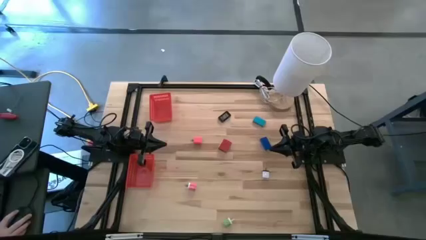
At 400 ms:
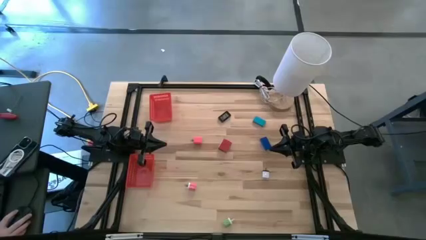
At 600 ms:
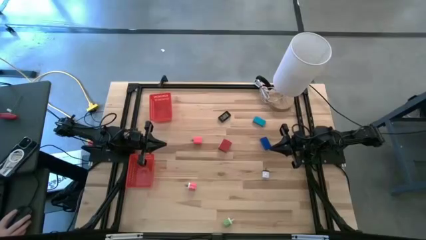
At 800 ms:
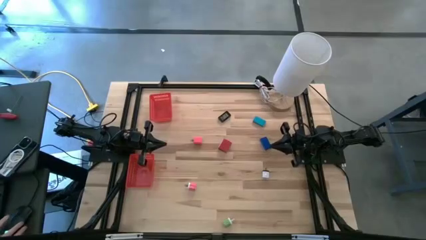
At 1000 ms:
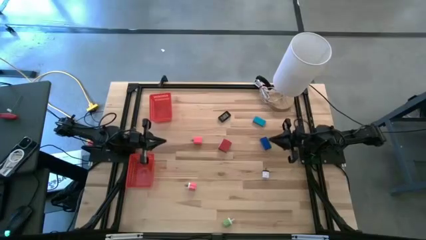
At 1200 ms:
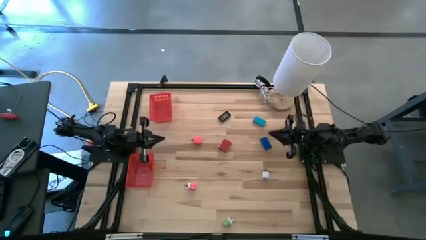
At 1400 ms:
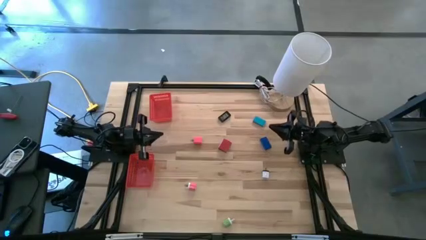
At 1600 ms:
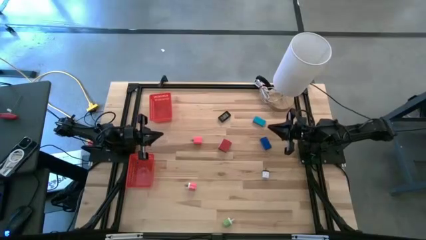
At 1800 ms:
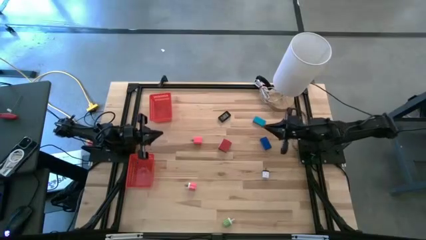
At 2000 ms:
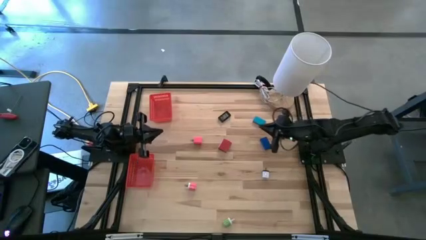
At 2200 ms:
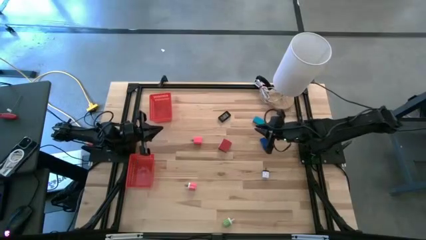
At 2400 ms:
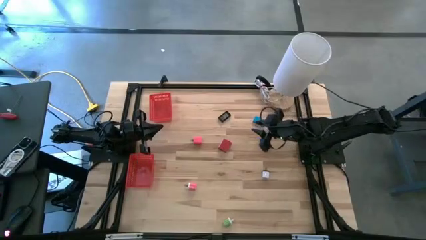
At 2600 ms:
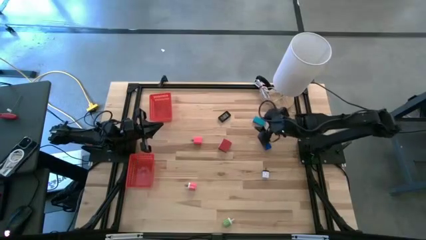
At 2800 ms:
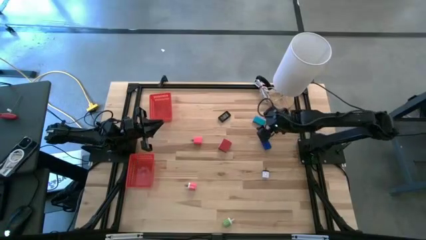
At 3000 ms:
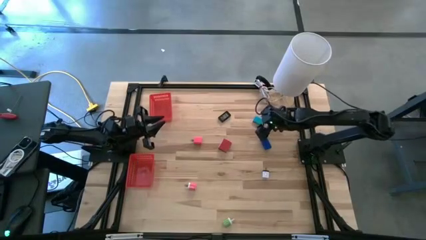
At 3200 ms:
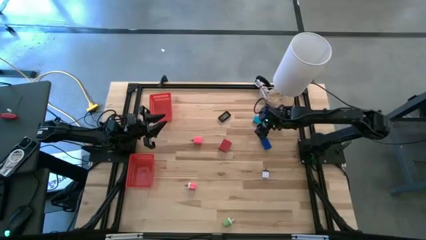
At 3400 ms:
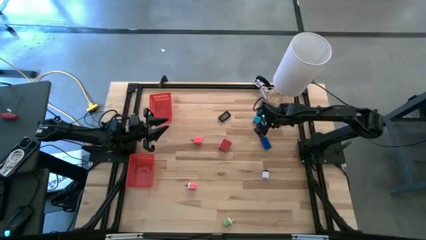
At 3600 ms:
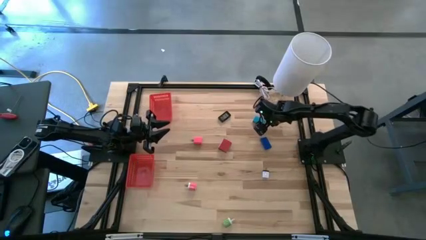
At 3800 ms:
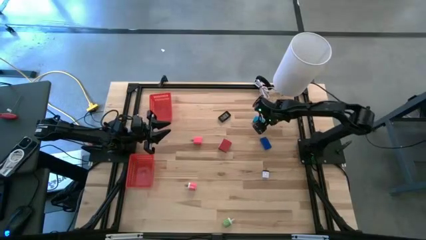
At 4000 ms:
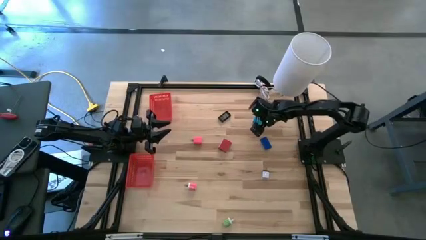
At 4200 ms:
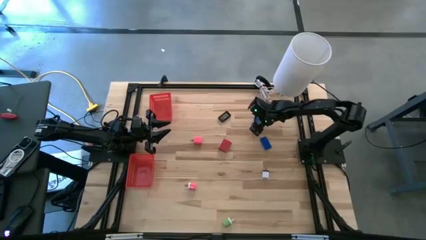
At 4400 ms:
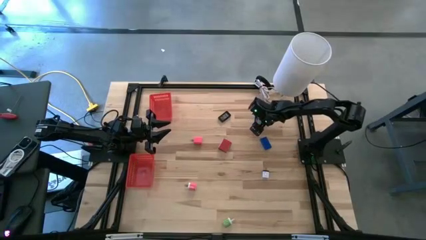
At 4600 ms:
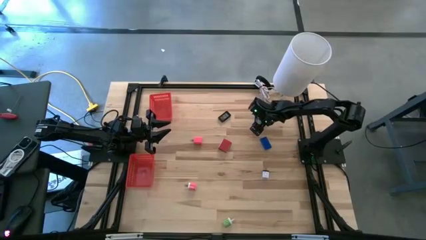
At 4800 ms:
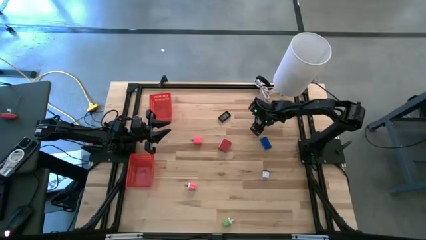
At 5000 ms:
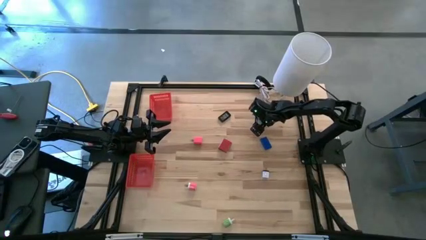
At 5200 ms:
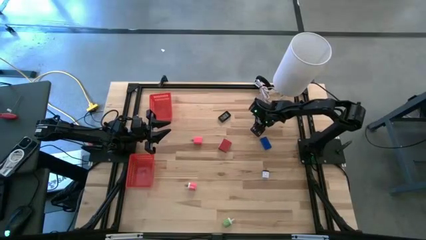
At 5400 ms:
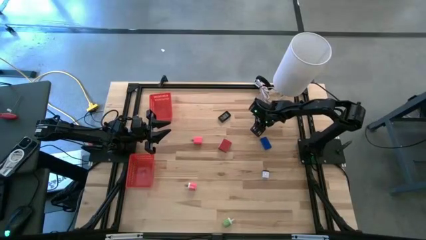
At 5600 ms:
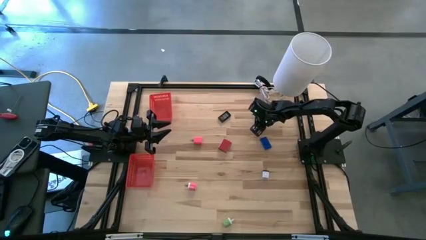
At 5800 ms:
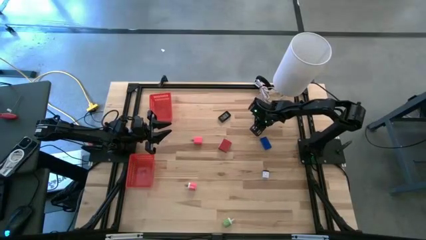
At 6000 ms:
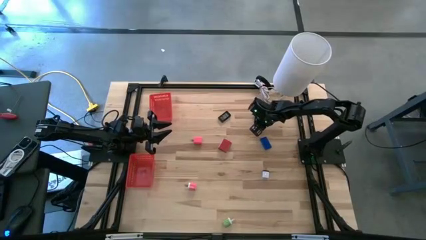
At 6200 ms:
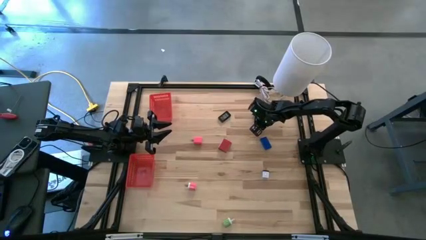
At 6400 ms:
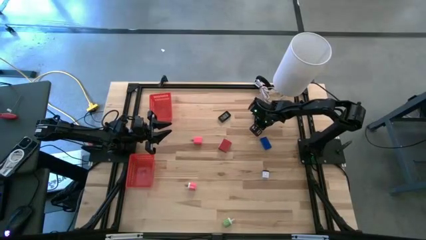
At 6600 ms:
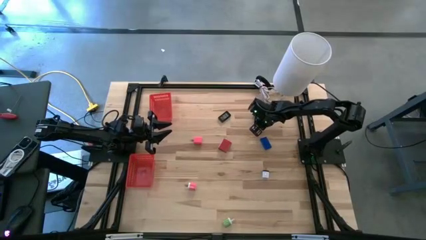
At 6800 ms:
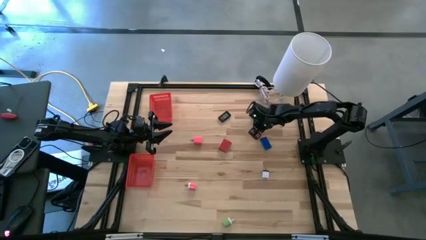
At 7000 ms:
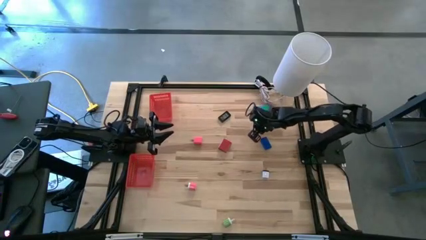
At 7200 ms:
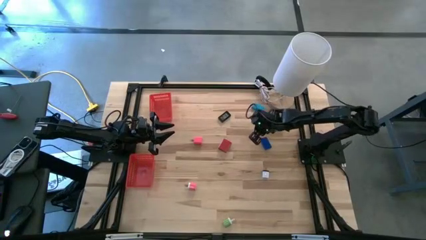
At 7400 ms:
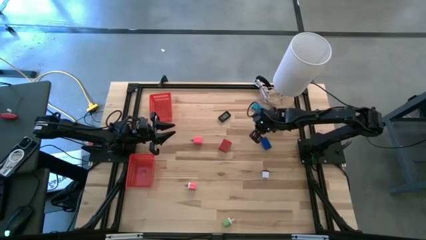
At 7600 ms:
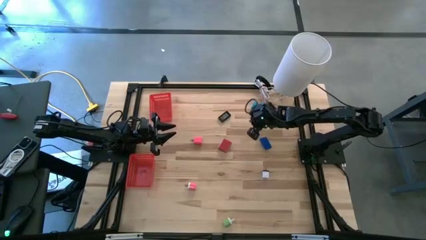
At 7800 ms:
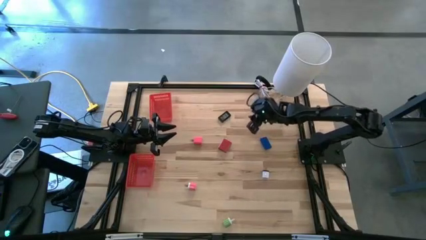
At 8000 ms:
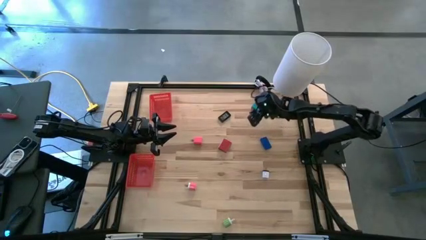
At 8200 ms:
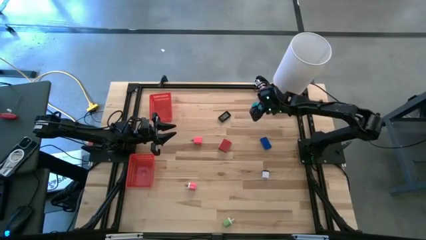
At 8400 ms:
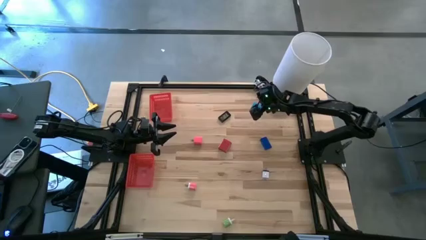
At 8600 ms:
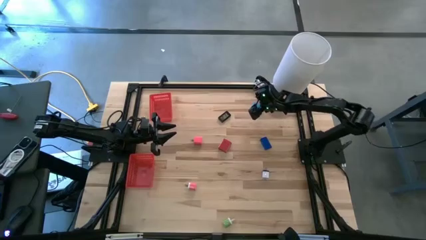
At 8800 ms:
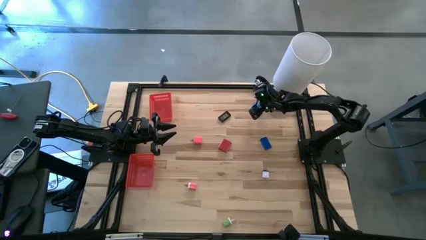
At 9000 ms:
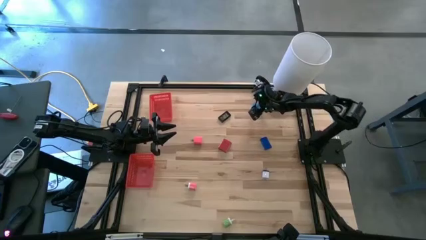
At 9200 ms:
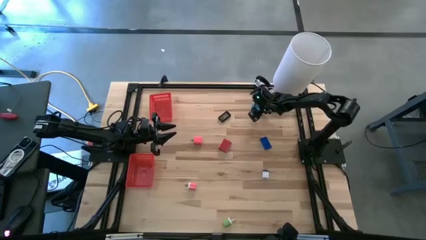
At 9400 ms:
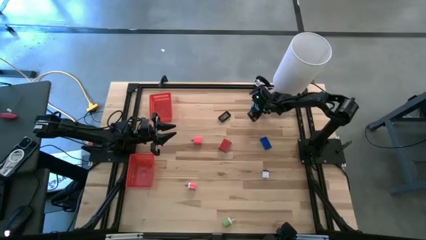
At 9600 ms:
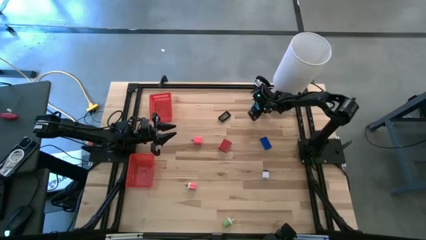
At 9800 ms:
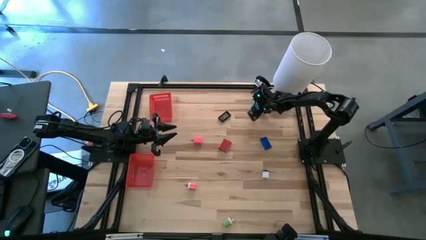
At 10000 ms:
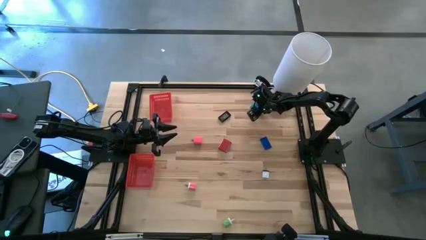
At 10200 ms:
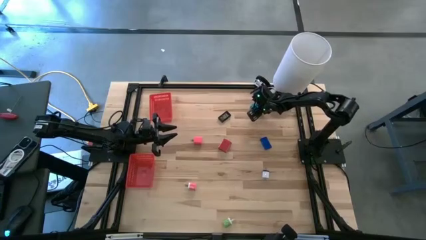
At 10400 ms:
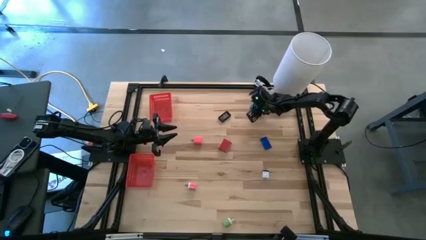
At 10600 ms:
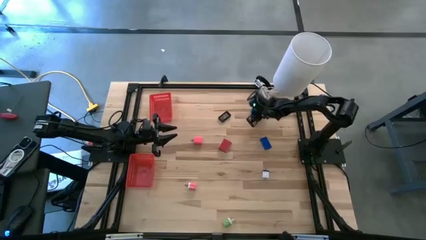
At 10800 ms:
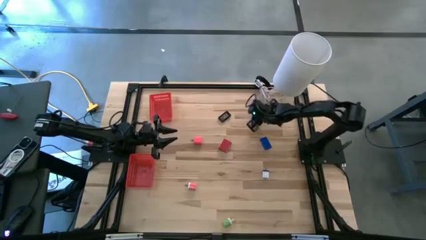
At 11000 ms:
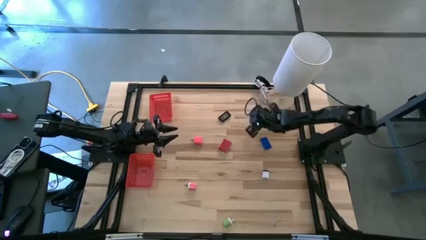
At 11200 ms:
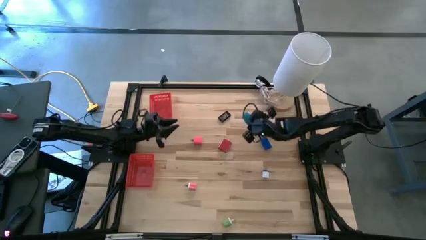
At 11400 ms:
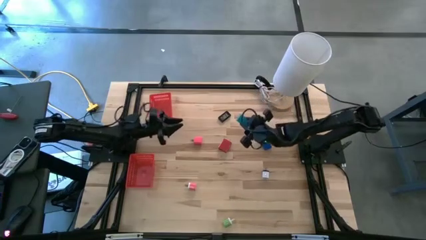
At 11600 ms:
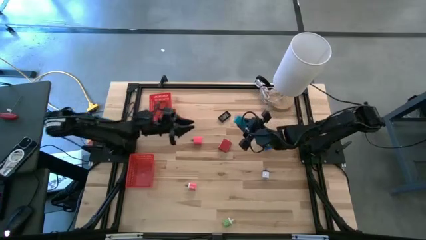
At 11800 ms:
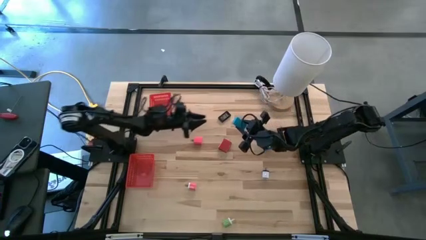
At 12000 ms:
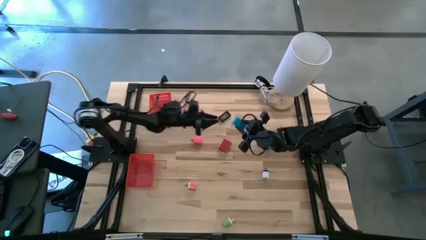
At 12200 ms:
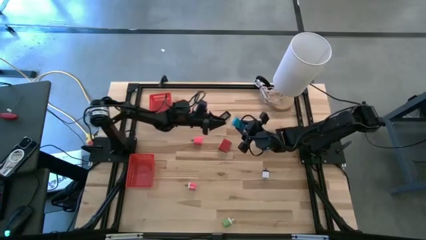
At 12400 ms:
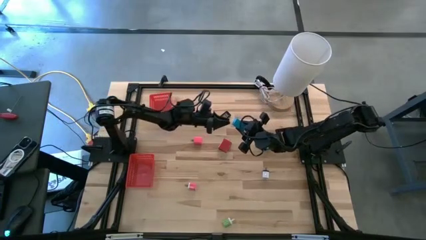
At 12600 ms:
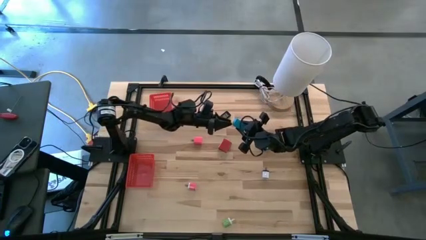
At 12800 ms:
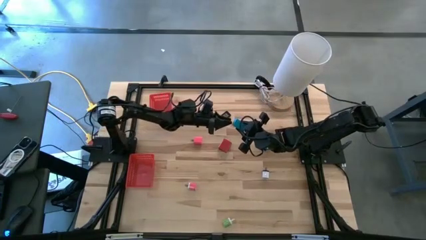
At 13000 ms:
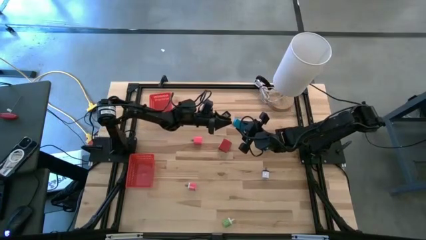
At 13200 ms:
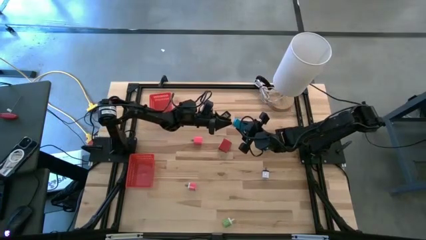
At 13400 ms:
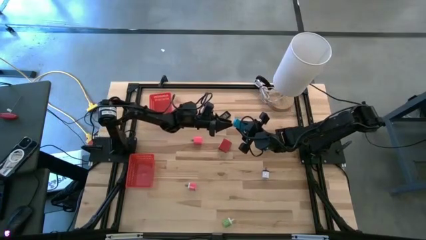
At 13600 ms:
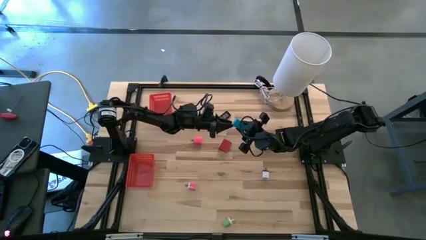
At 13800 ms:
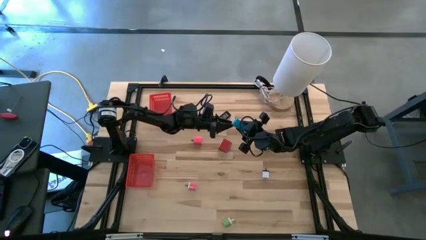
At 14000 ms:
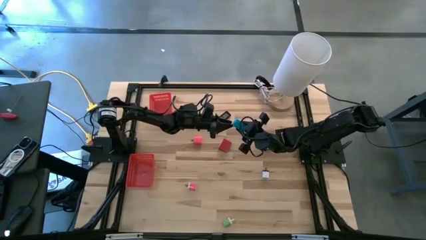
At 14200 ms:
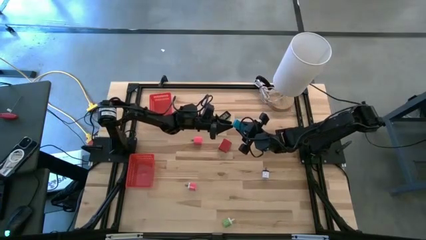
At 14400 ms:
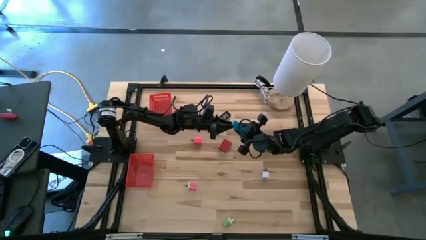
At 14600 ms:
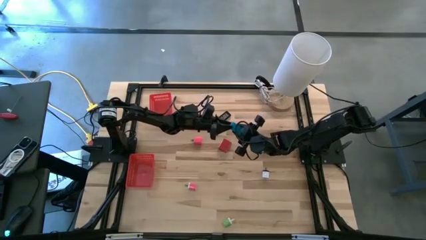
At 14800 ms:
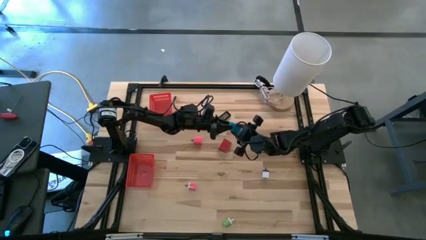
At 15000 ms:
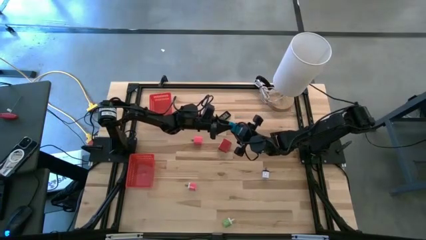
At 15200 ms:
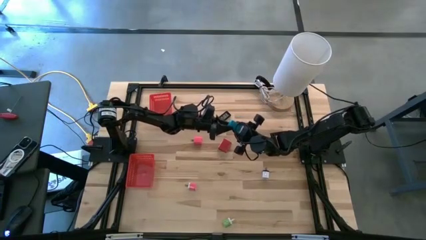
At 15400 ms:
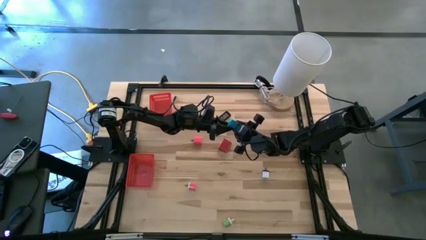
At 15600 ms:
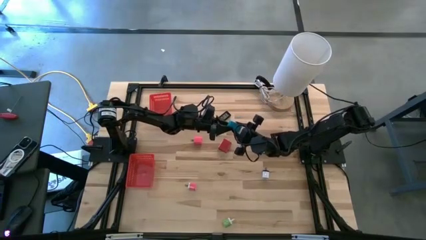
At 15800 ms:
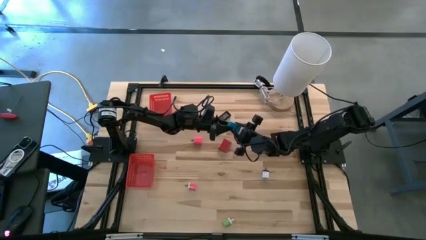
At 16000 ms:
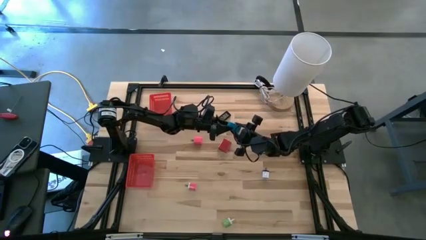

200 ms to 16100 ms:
Task: Pick & Place Office items
Put the light blue digital clock into the bottom red bin
